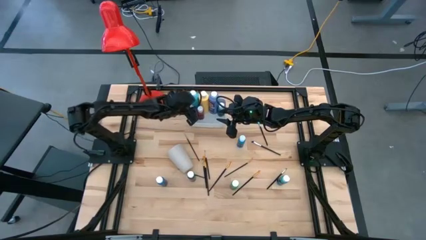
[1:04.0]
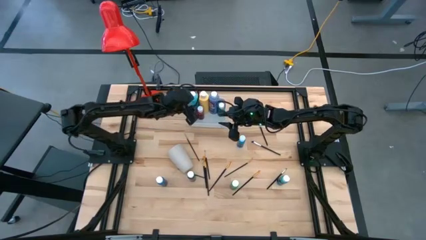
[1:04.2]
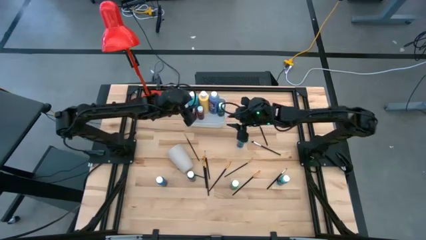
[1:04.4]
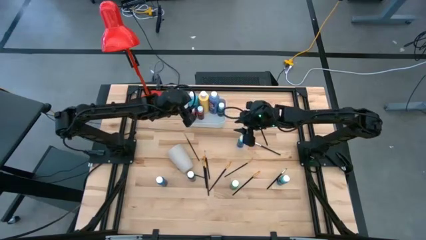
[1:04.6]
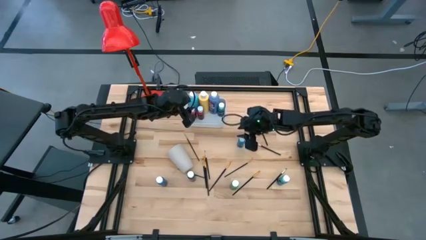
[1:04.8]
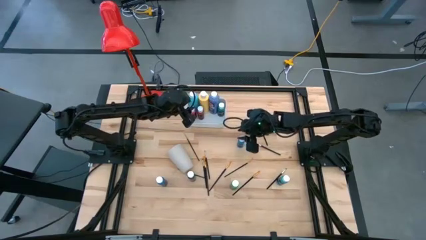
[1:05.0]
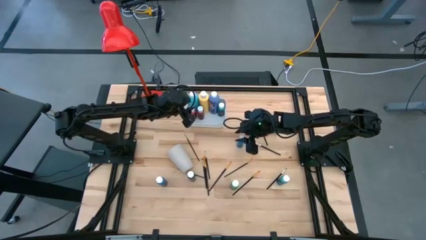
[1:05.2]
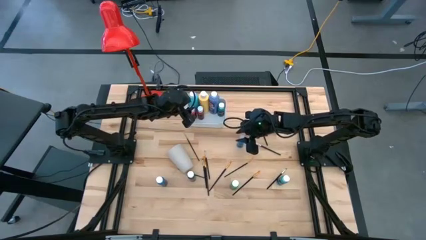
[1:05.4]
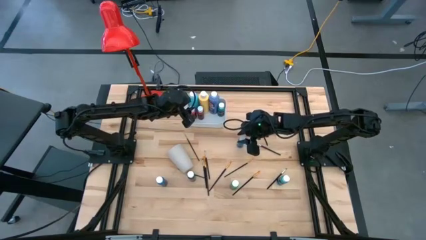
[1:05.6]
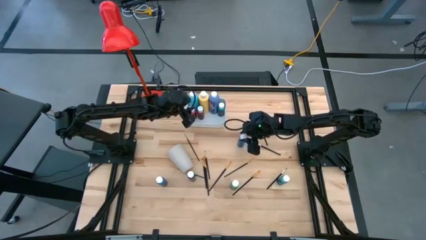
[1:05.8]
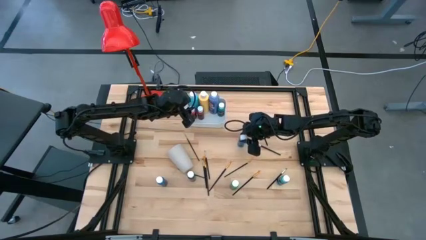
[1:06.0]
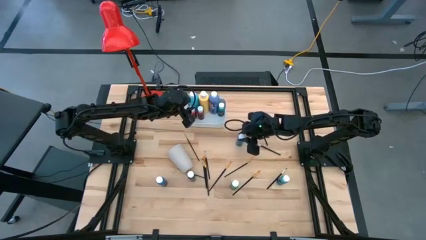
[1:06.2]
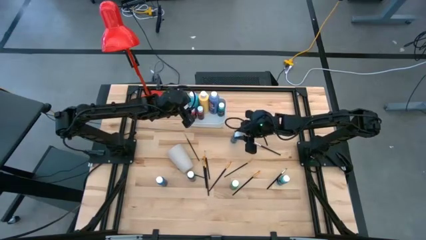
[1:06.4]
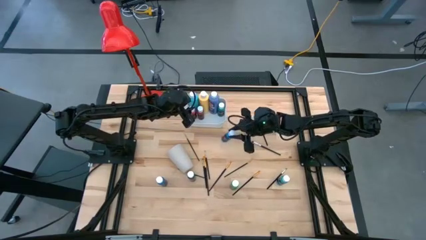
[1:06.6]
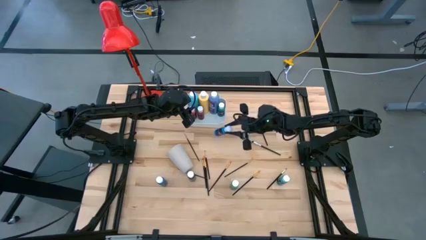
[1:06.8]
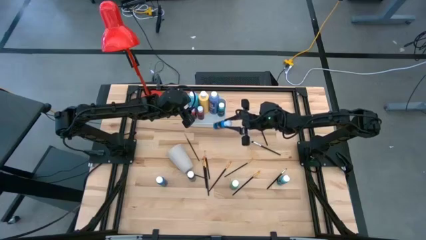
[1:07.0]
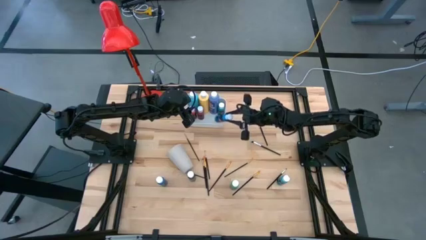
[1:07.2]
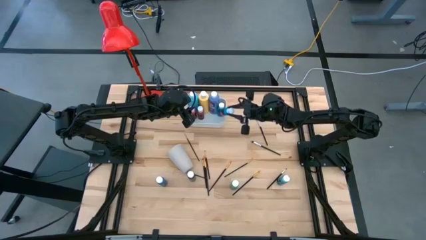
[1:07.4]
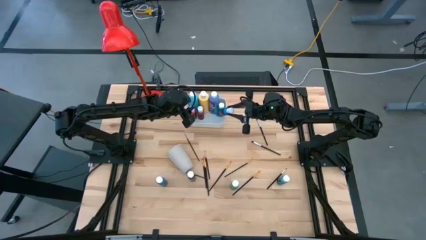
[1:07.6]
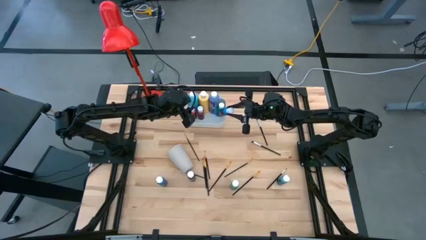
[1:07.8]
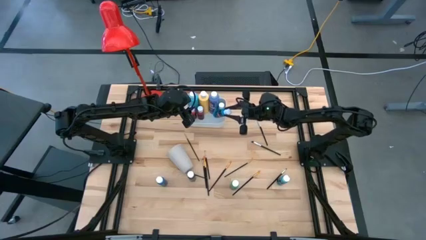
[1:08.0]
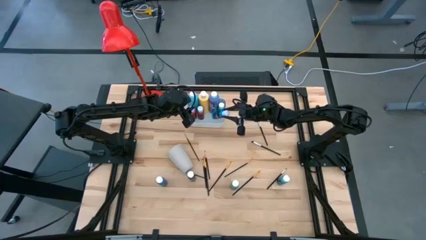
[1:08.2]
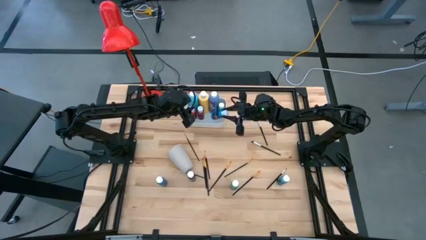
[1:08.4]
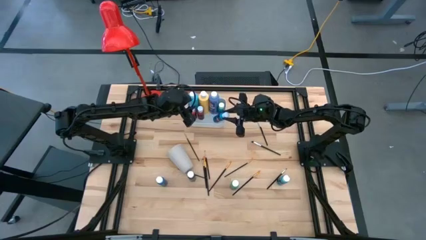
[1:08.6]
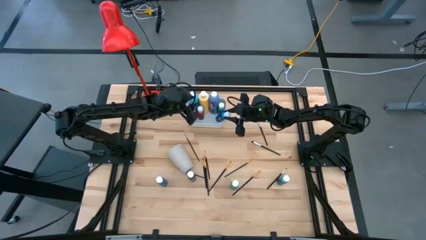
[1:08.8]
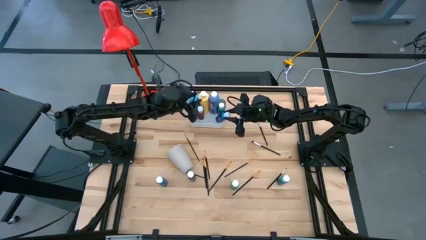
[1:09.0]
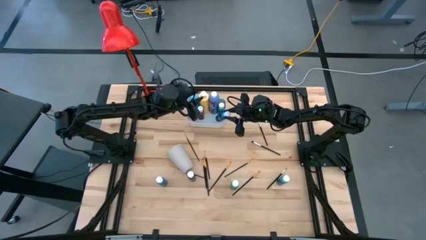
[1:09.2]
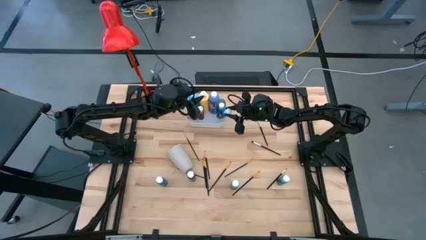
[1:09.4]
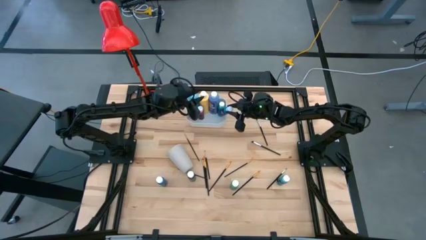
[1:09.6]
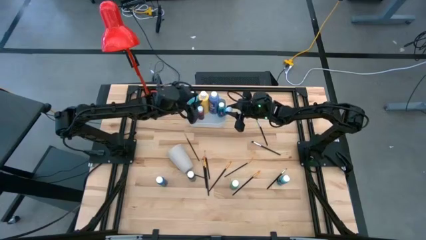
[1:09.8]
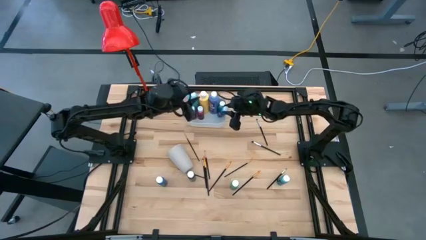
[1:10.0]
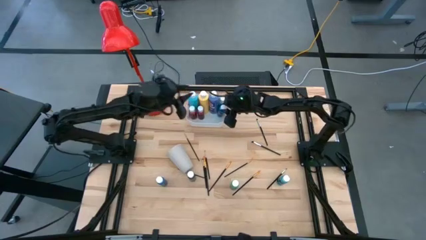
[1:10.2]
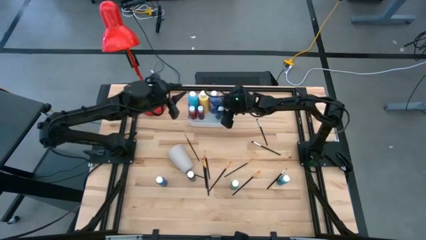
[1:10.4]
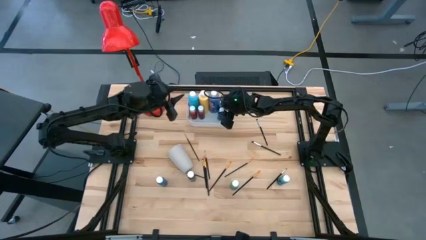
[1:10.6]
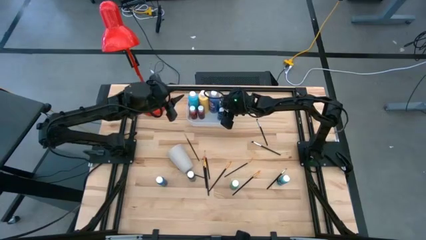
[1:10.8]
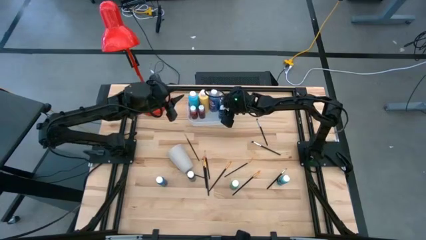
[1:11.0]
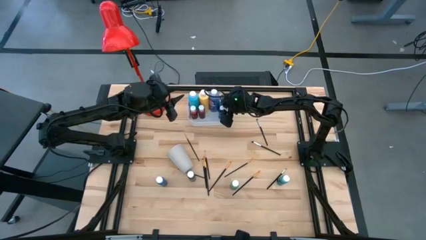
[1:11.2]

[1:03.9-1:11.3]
Task: Pick & Place Paint Supplies
Put the blue paint bottle into the white bin

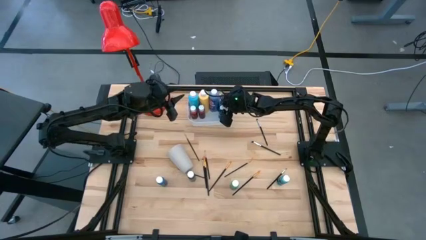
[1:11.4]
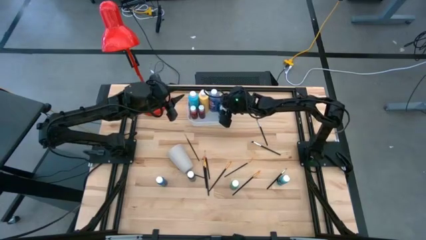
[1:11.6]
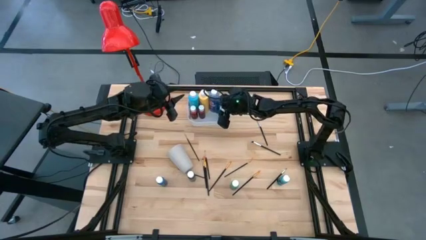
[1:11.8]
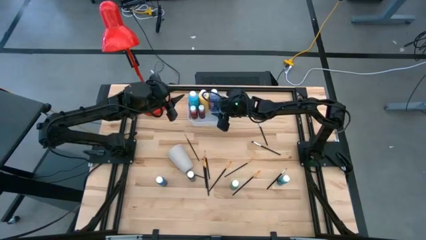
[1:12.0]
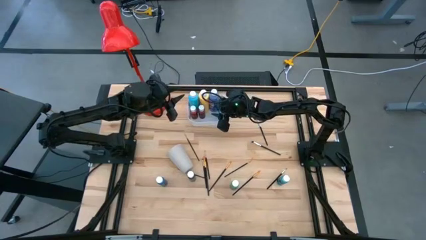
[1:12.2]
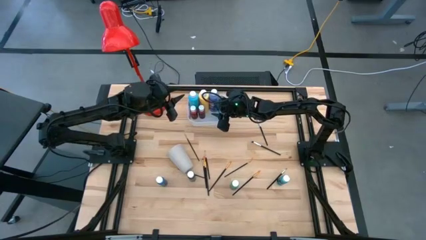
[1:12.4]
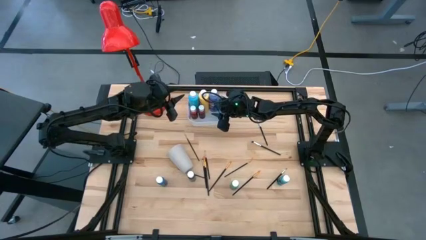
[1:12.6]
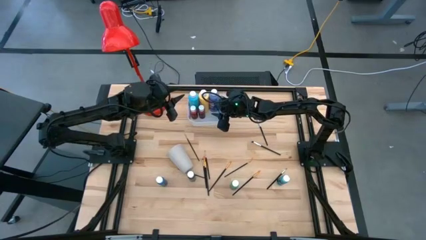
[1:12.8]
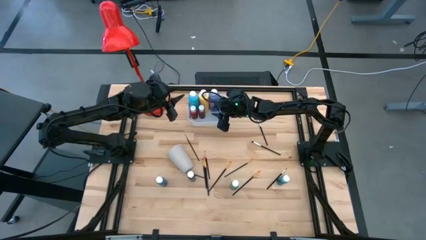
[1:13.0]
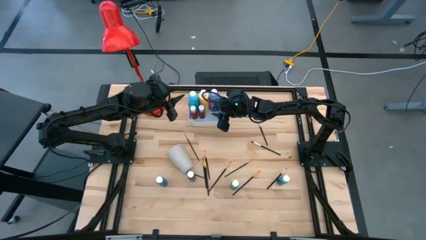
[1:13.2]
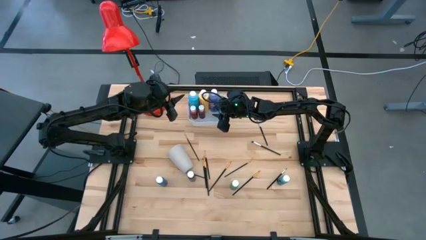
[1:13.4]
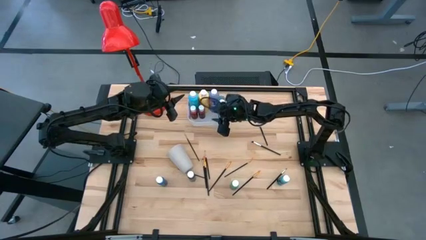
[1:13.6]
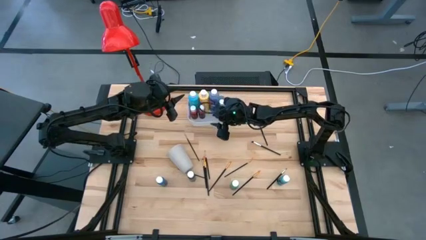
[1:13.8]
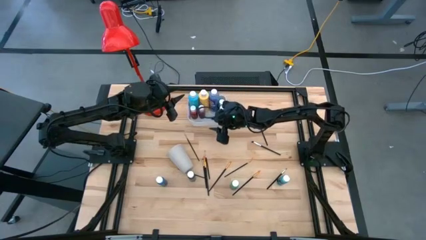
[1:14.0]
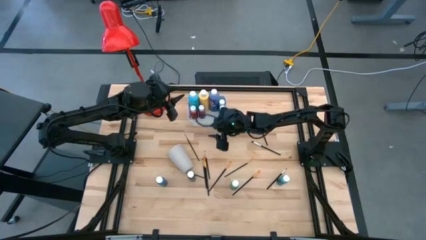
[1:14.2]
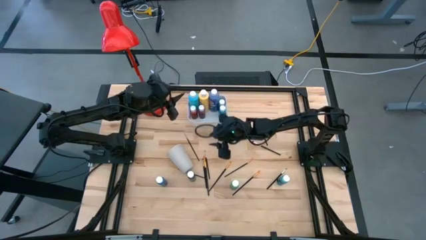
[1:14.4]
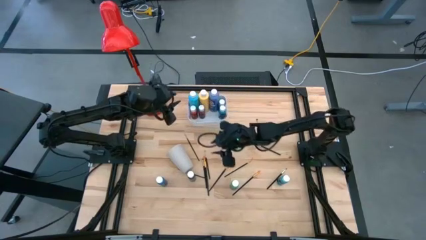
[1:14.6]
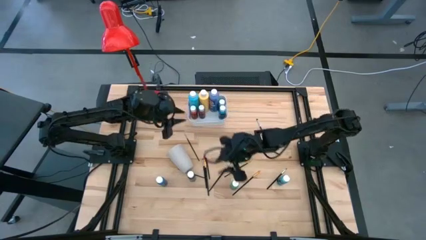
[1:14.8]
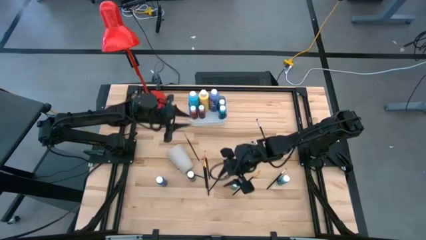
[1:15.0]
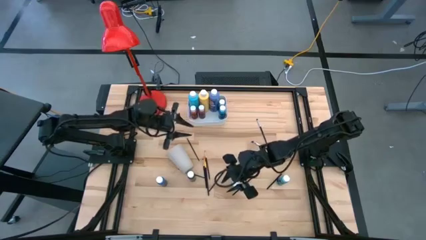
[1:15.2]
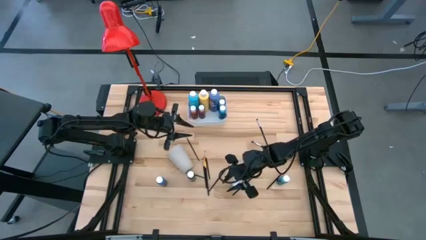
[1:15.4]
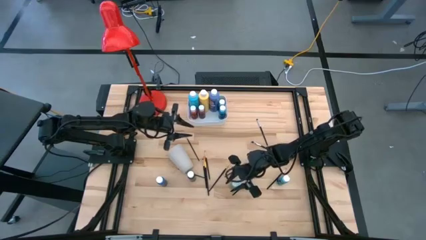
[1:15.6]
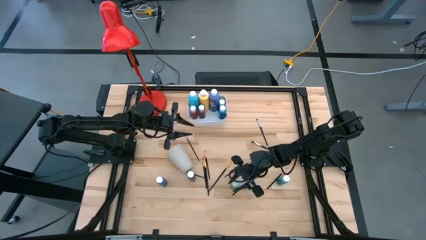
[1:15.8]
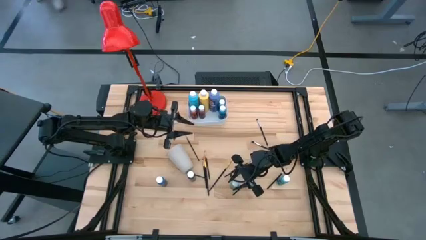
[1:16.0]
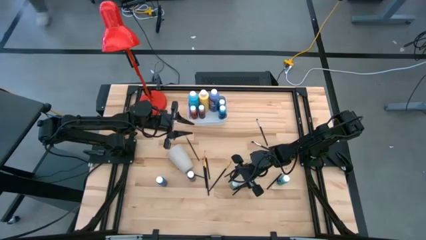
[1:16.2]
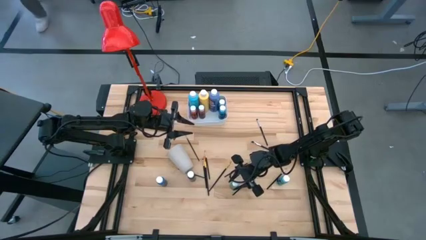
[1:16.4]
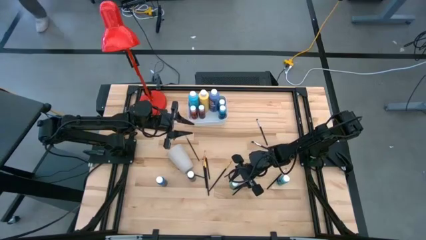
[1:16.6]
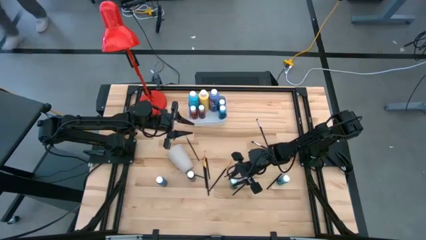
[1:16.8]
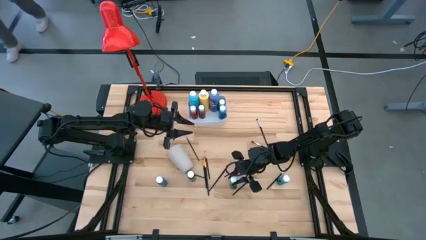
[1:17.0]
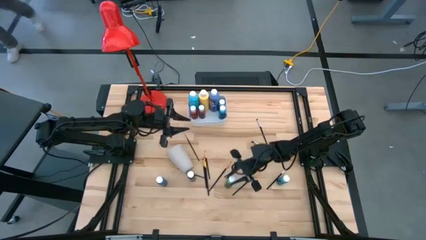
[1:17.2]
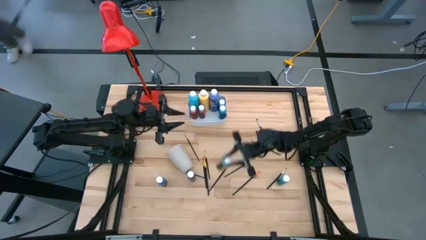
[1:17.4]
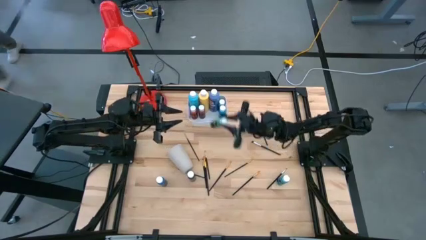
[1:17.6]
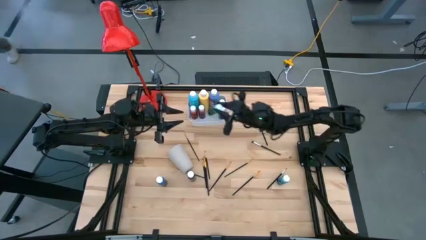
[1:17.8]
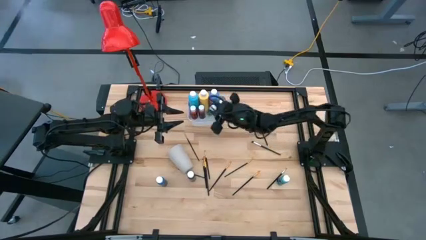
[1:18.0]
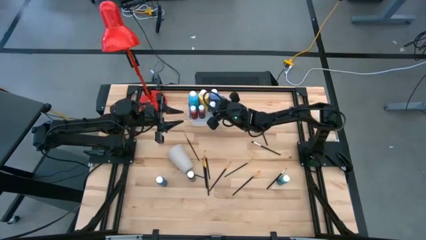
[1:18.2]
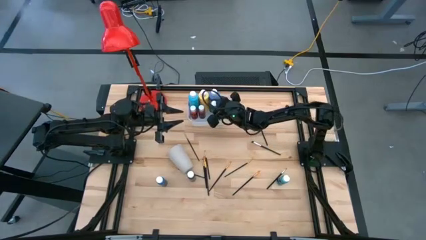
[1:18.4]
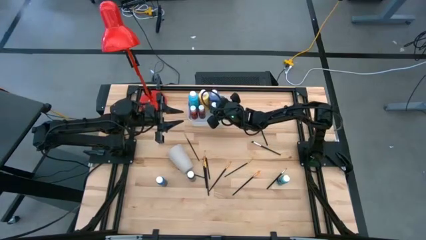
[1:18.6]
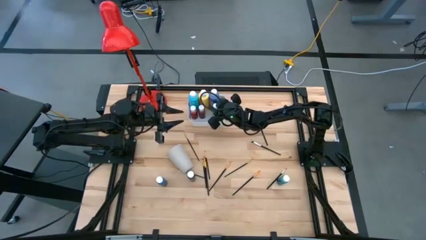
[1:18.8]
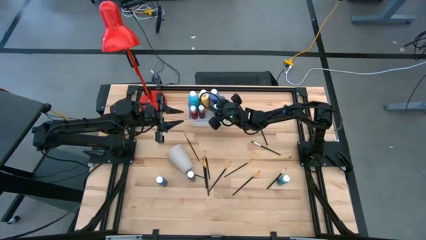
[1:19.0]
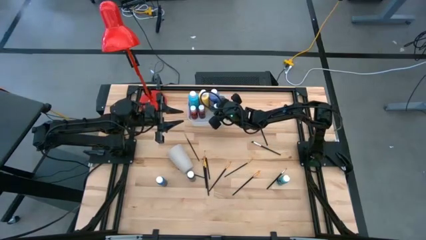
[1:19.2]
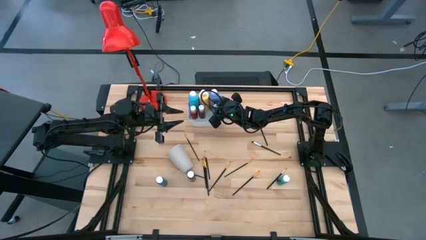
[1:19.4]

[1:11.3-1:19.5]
Put the green paint bottle into the white bin
